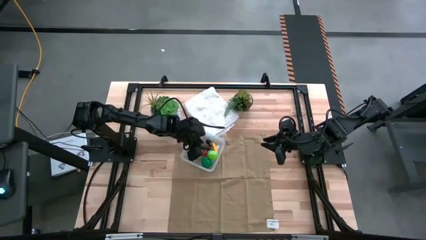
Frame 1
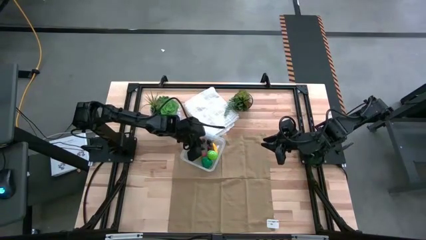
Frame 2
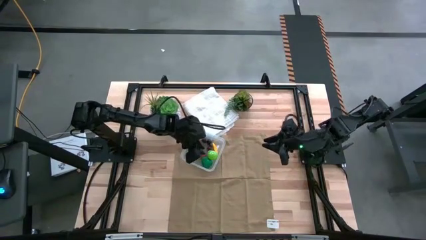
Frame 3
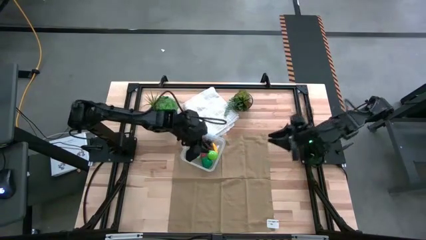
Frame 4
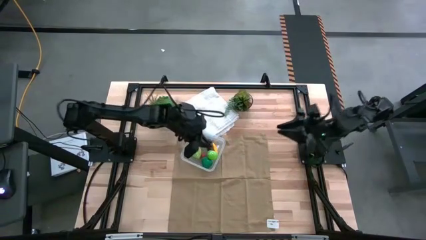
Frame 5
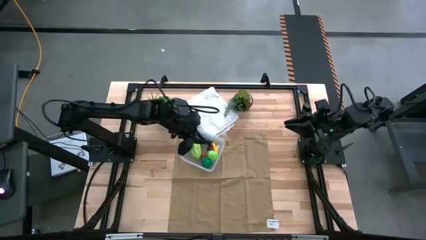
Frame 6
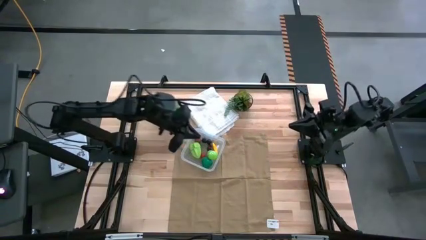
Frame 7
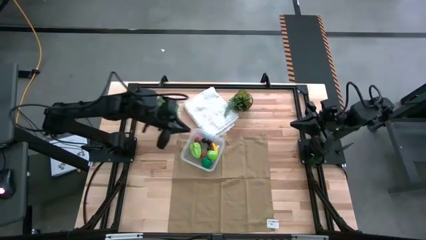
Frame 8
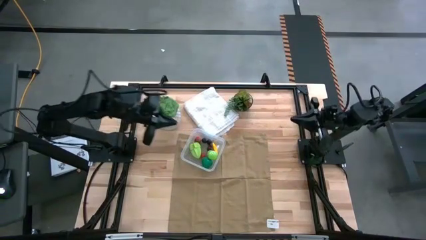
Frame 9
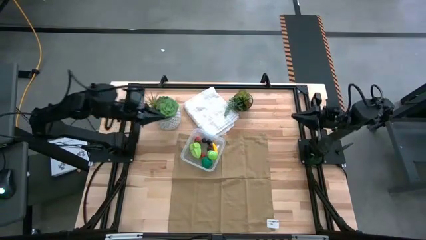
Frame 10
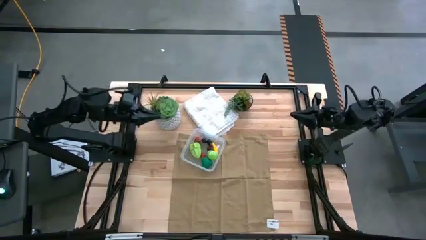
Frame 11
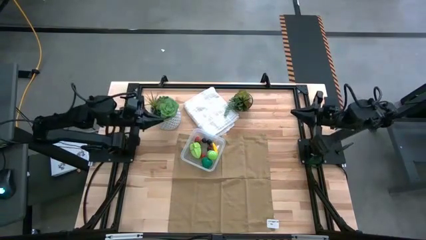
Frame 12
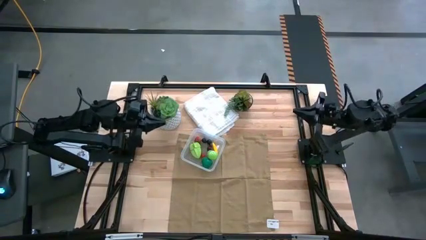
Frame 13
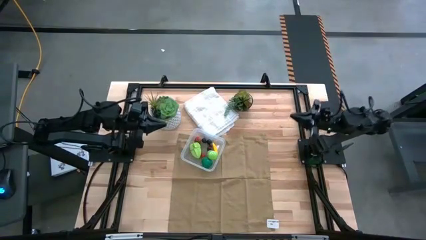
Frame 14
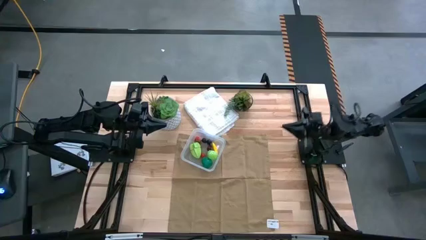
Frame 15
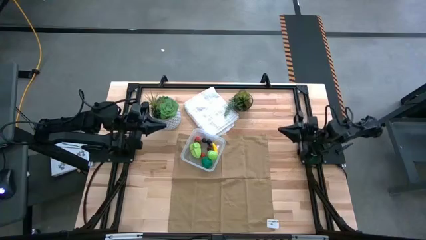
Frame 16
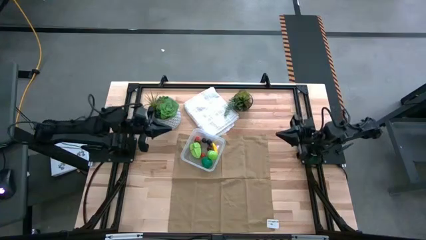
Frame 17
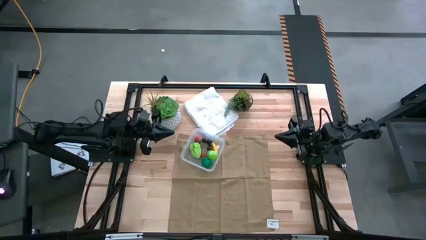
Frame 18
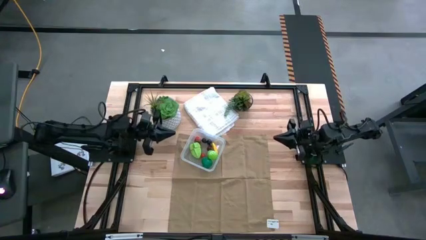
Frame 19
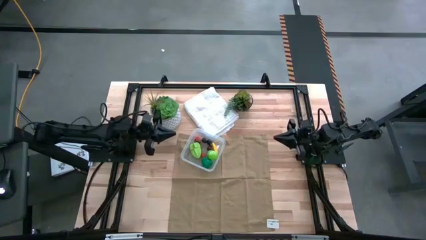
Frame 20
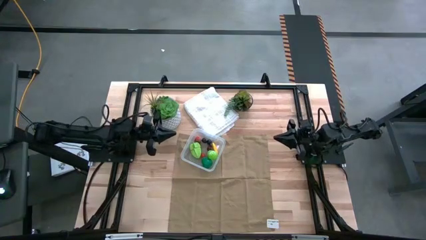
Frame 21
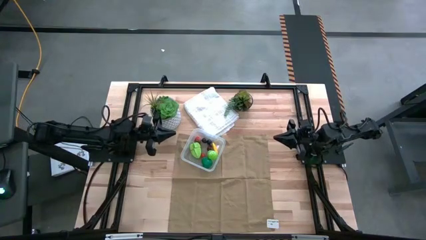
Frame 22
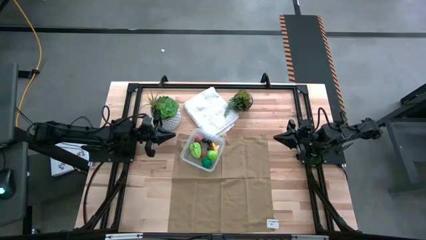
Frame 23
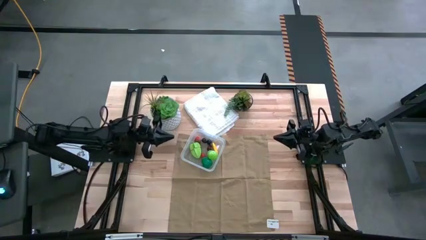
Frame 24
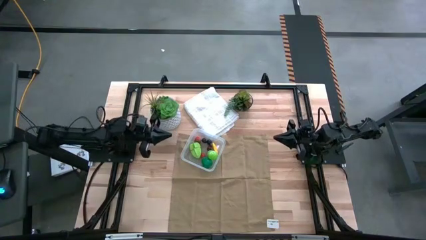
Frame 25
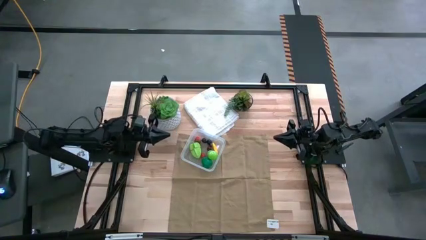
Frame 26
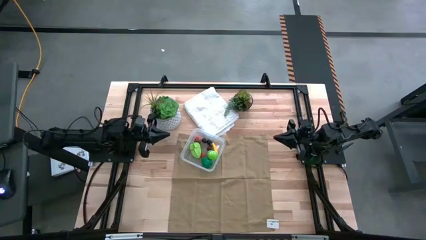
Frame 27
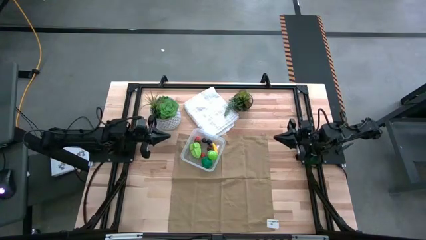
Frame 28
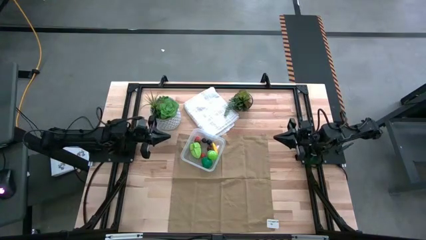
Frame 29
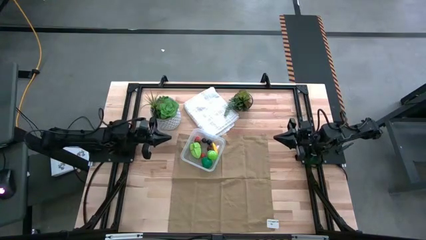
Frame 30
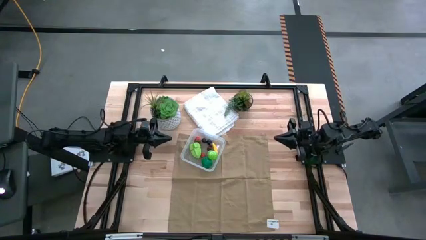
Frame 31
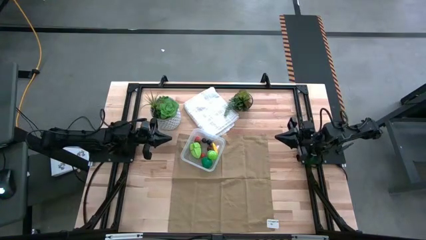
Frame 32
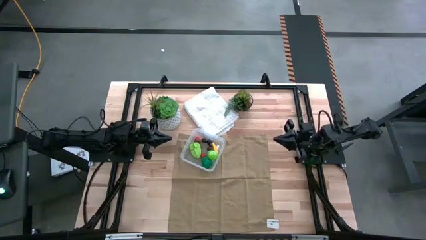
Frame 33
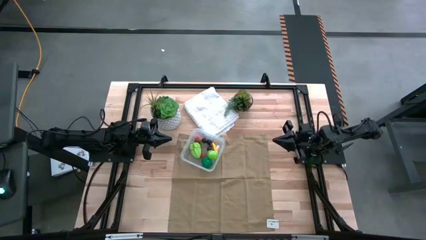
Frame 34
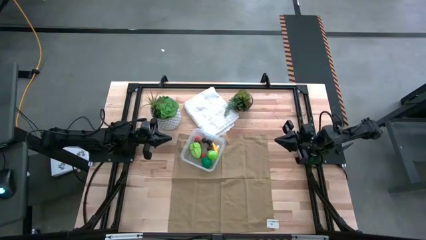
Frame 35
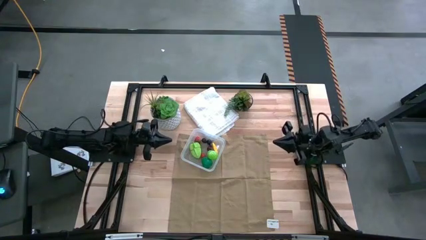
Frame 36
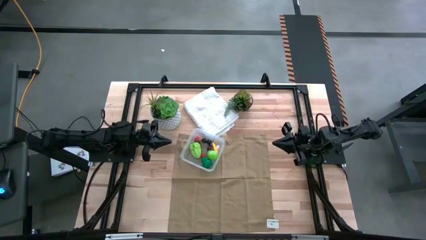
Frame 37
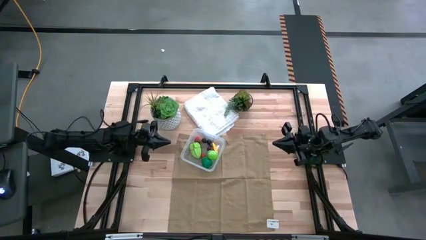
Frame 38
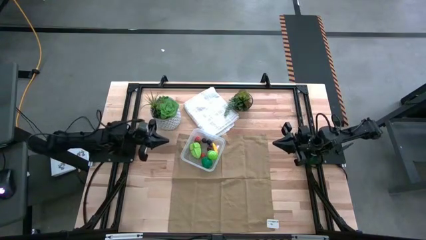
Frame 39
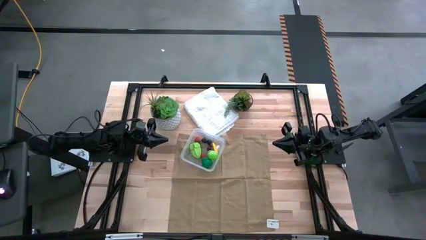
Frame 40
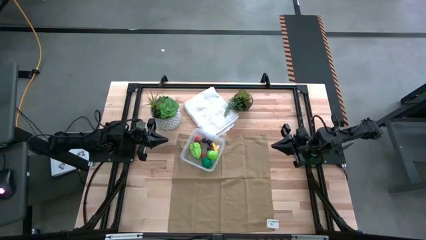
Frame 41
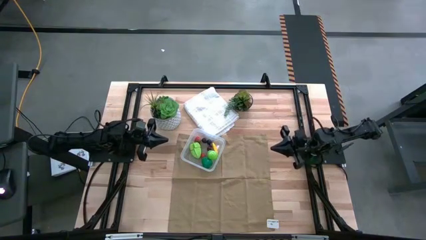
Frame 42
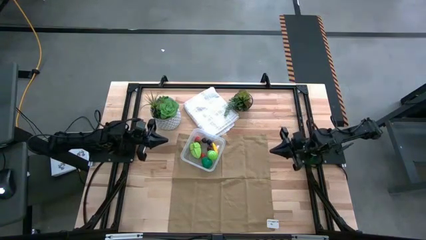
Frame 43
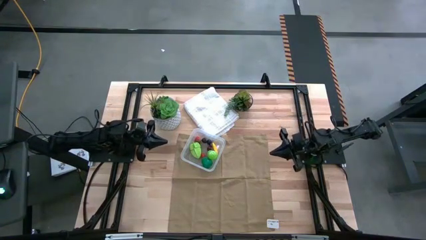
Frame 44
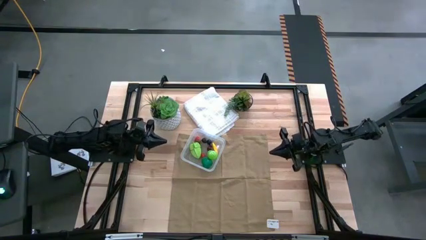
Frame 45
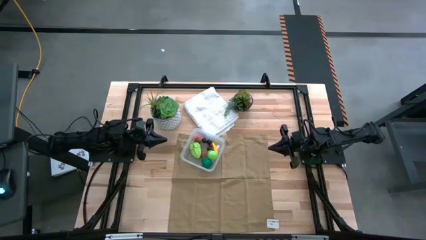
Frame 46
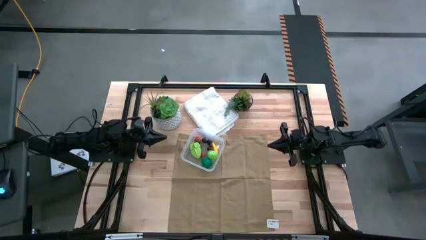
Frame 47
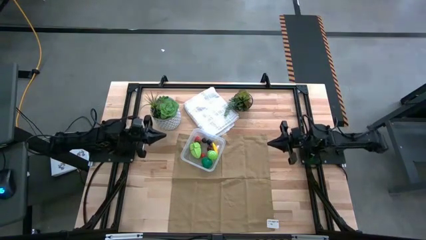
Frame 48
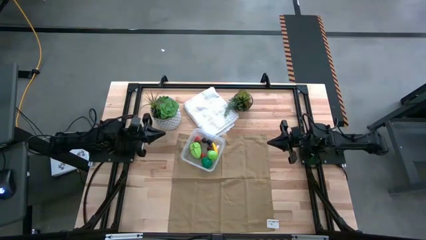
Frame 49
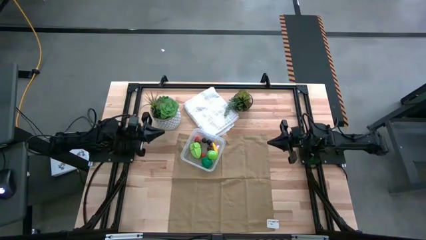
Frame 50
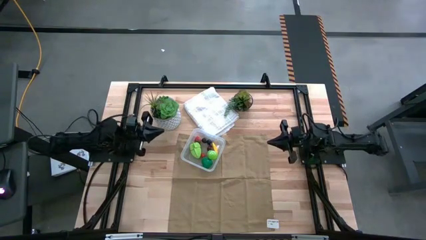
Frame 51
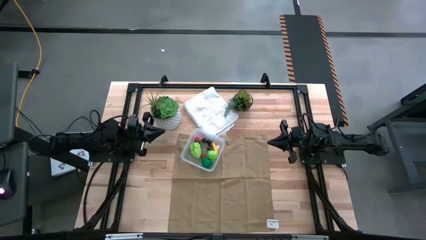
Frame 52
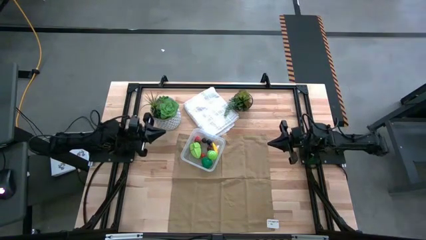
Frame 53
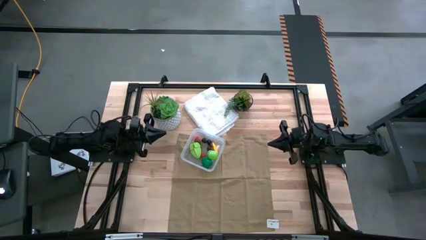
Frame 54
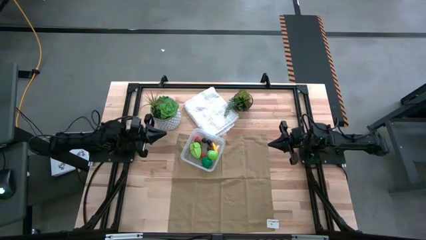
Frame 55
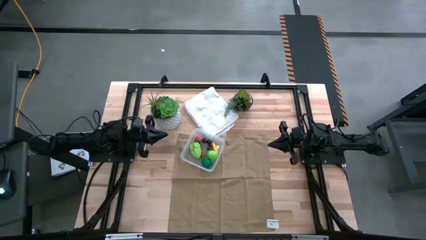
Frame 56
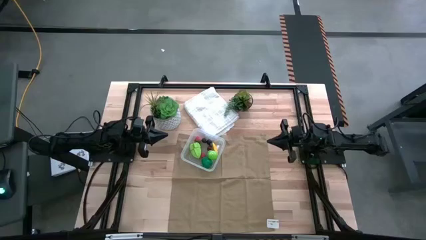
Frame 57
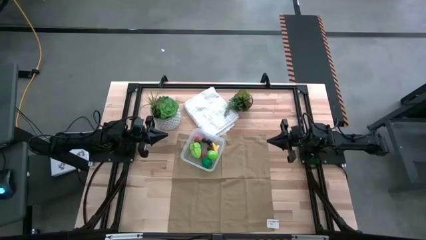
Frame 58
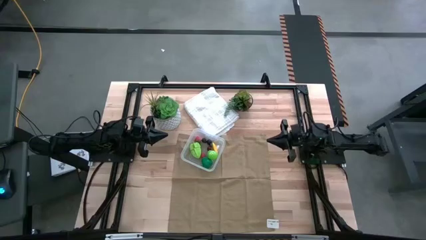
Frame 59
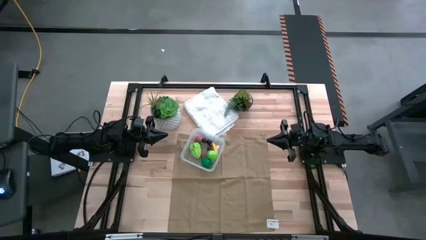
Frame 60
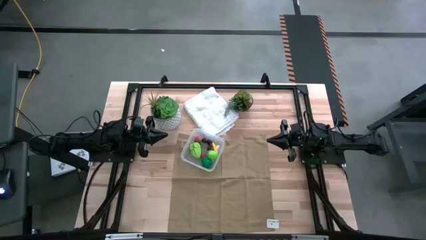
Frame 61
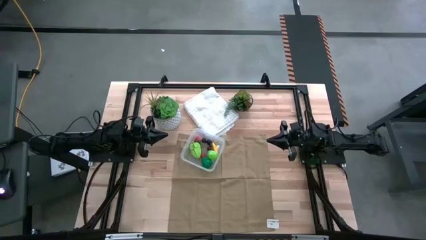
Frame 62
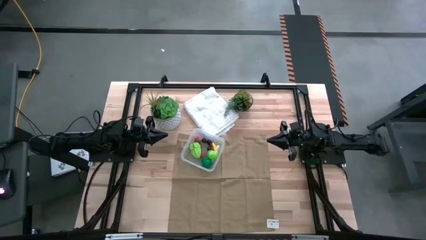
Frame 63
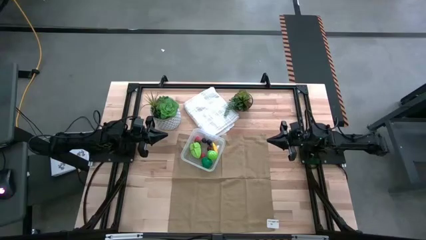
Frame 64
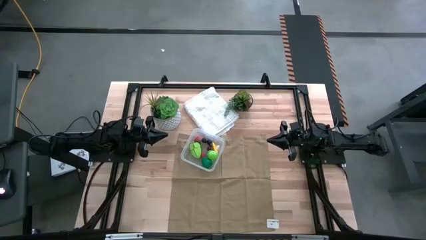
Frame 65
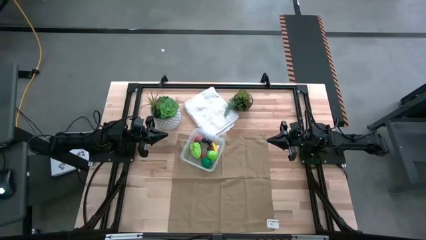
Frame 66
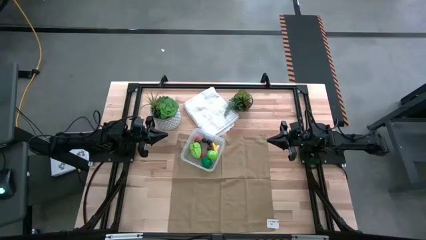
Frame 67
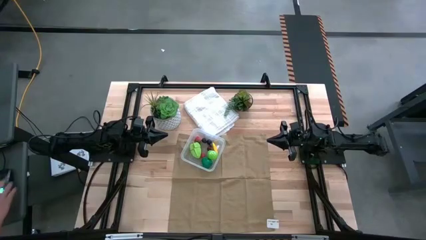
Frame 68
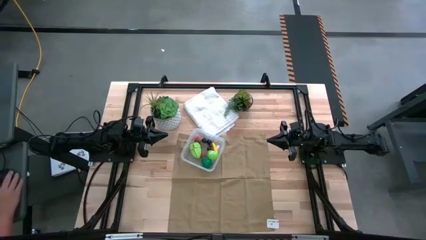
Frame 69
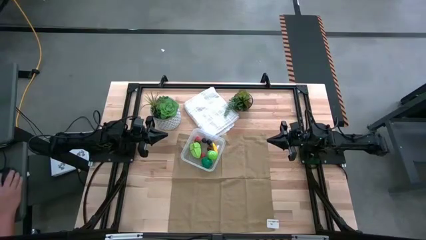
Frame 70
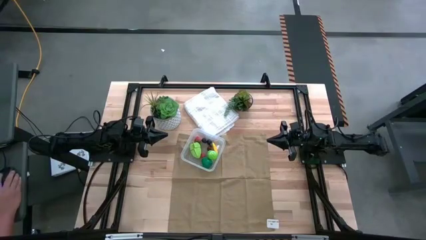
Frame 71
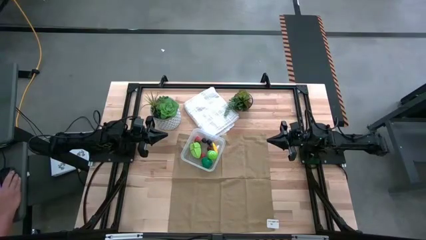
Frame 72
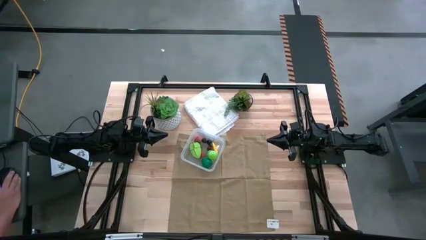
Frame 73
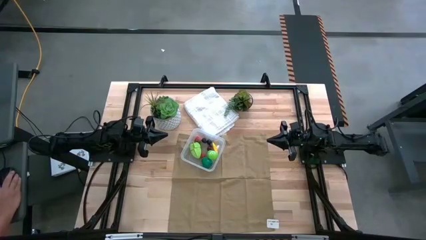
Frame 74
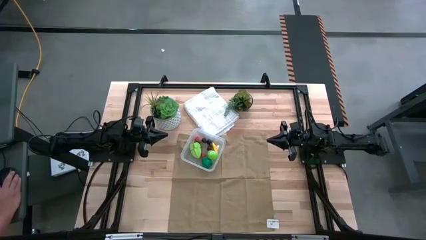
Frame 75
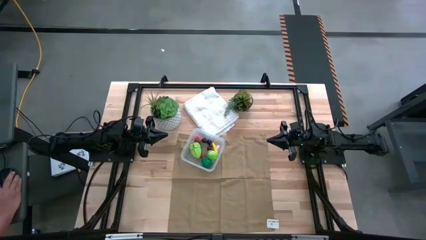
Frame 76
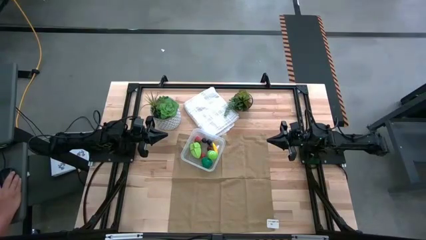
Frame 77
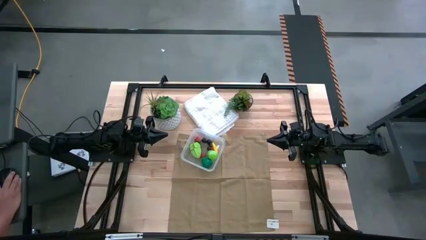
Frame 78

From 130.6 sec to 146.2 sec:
Task: Pick and placing Produce into tupperware
Return to Home Position
